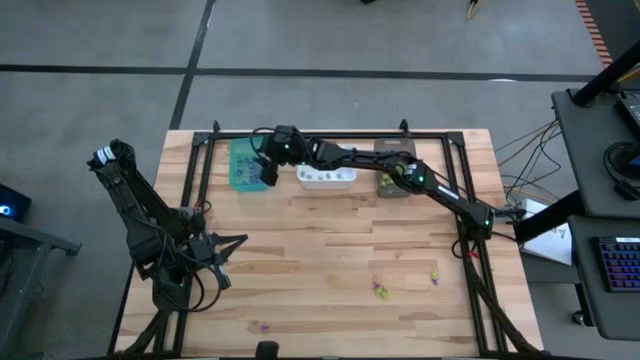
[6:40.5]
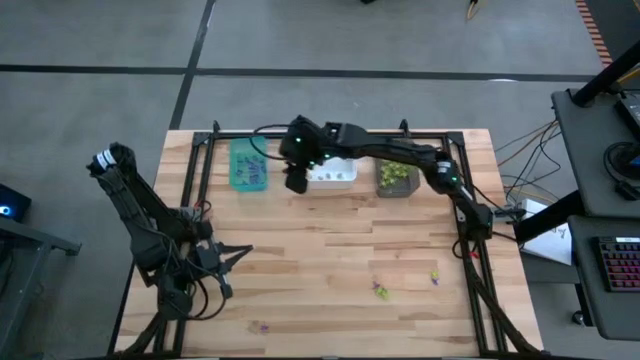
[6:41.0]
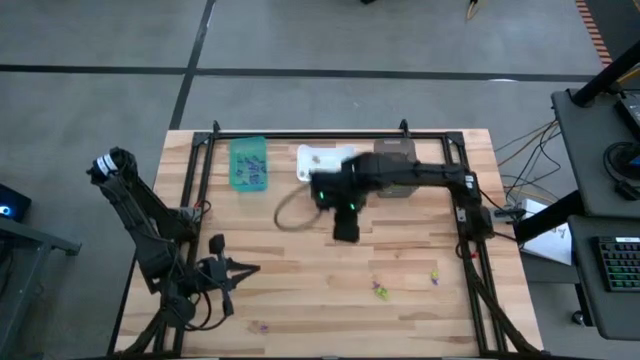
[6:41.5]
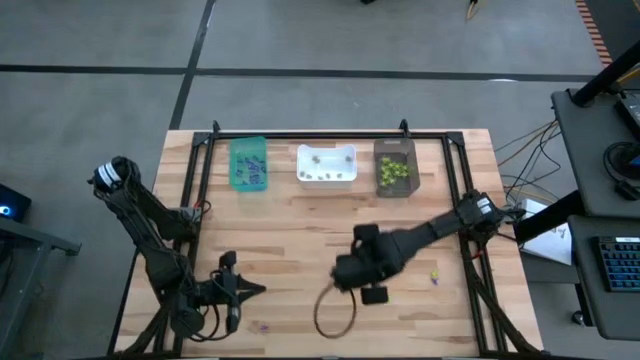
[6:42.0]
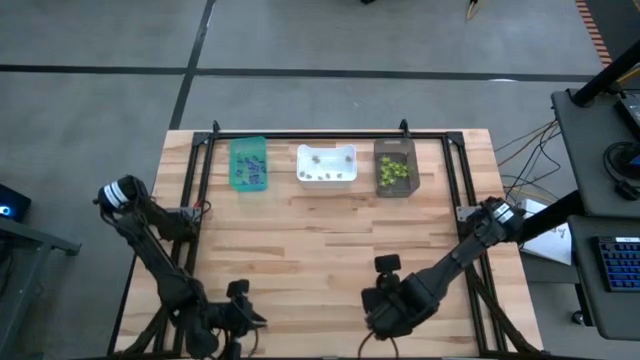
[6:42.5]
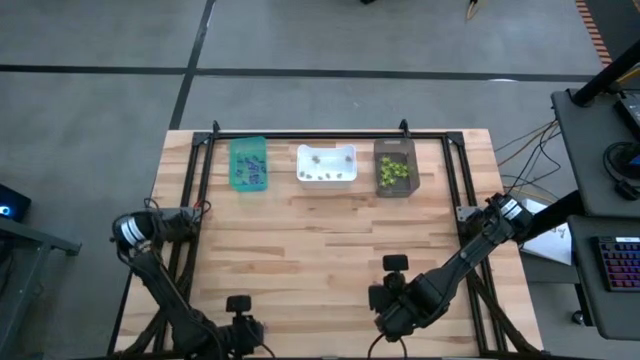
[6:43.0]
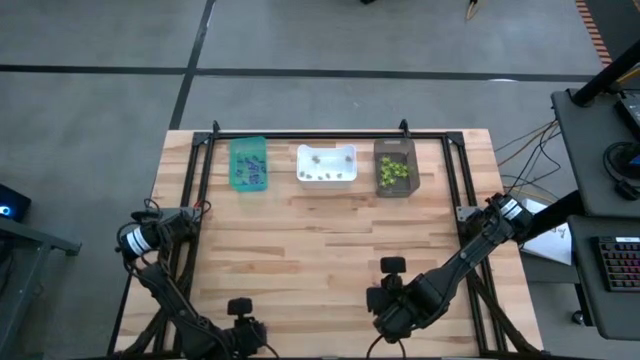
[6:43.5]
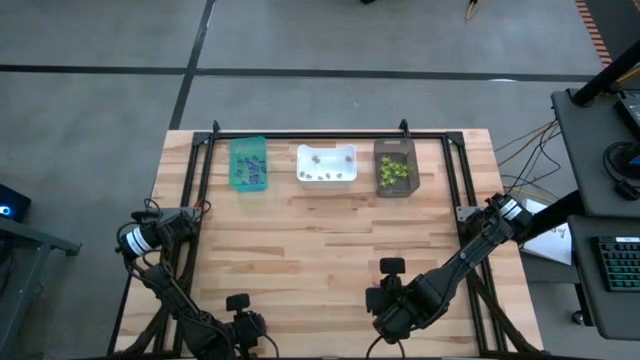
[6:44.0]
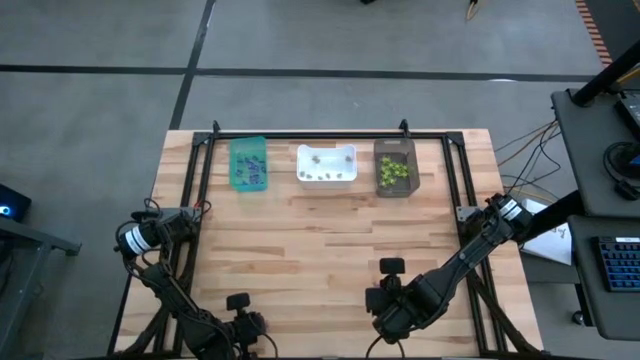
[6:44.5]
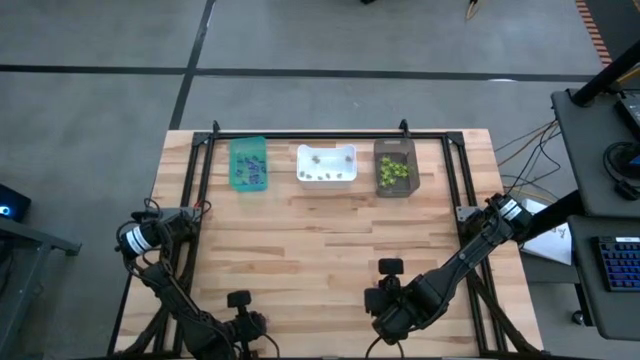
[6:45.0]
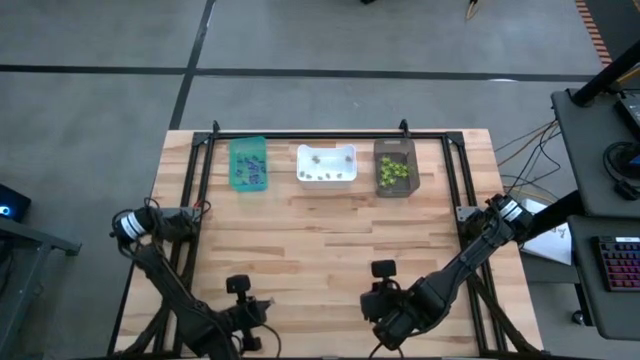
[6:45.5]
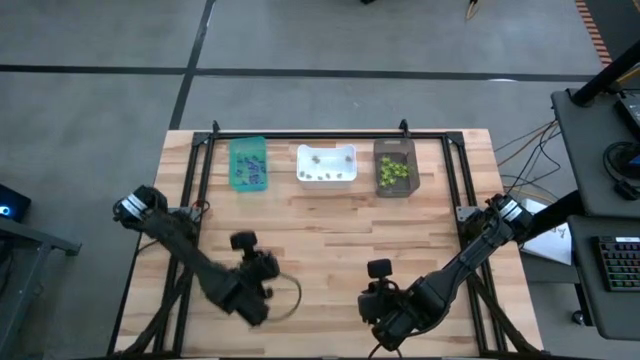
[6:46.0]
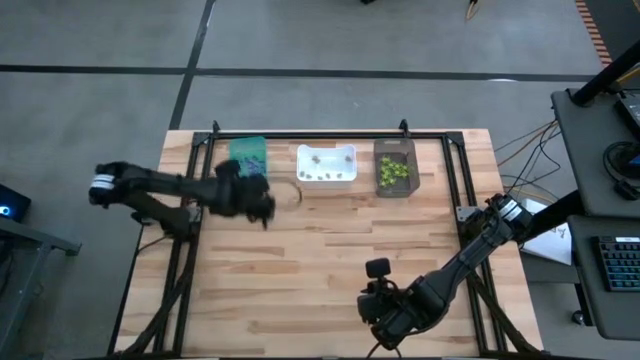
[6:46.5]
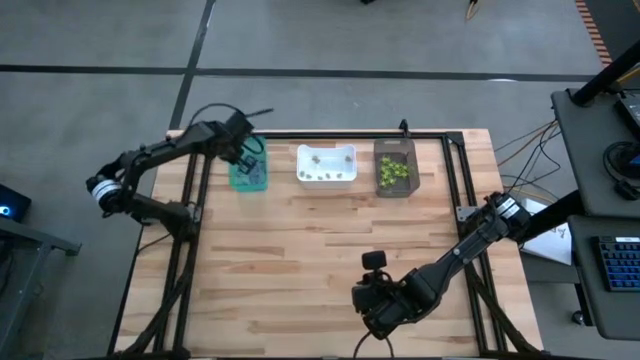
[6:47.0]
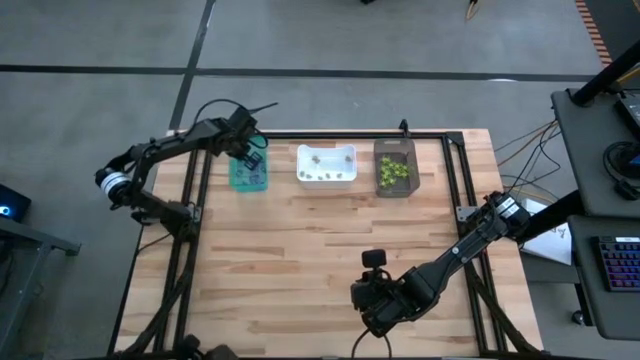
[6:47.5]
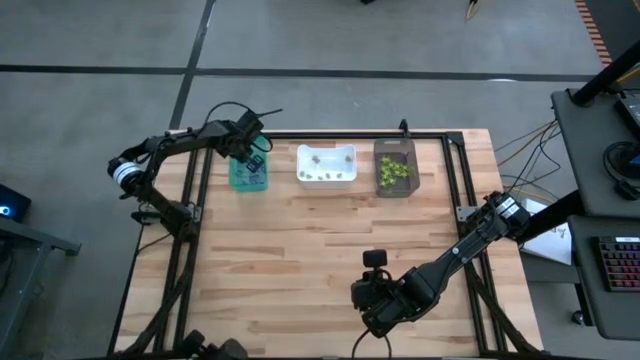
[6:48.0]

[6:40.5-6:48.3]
Task: Sort Halloween decoration
Put the purple witch hat toy into the light blue bin

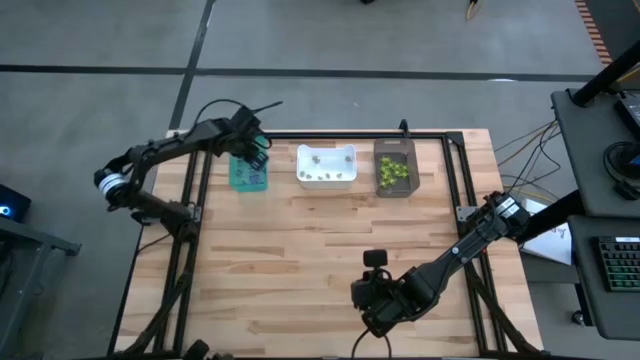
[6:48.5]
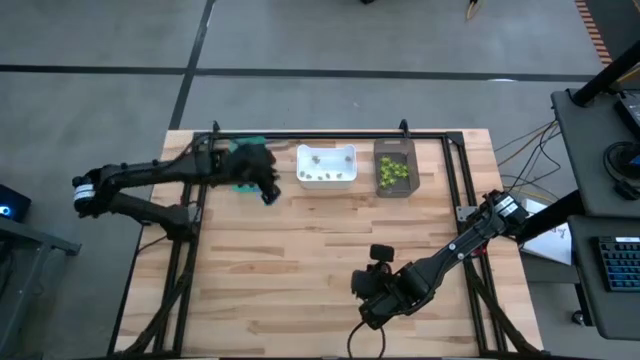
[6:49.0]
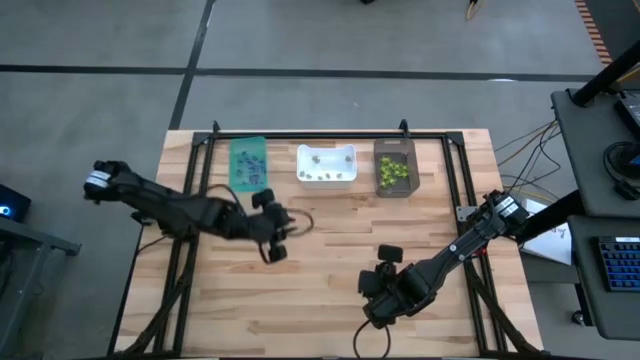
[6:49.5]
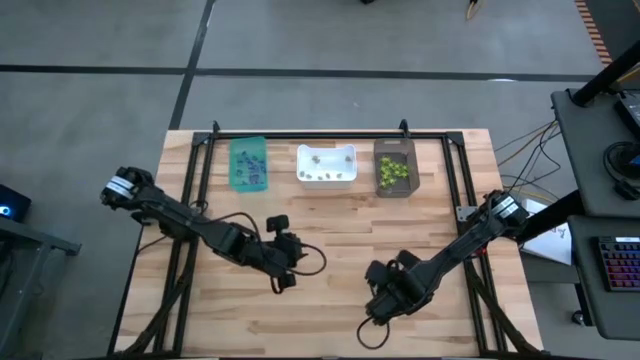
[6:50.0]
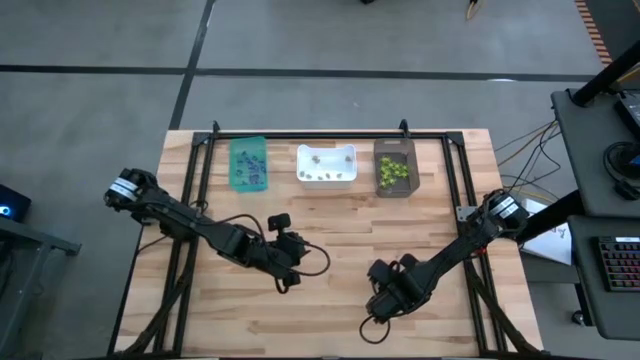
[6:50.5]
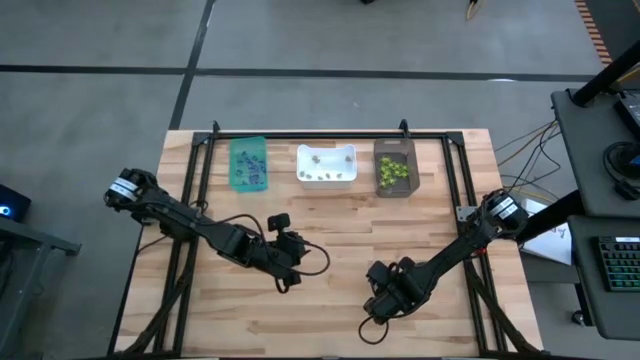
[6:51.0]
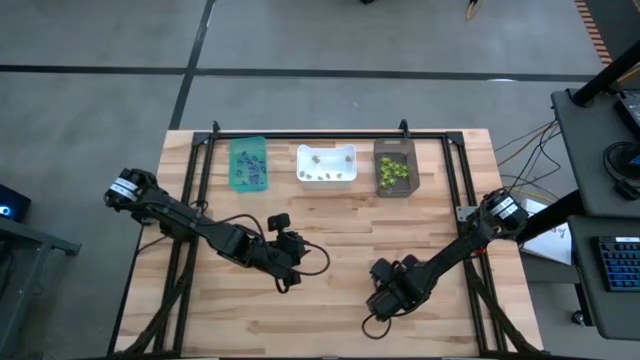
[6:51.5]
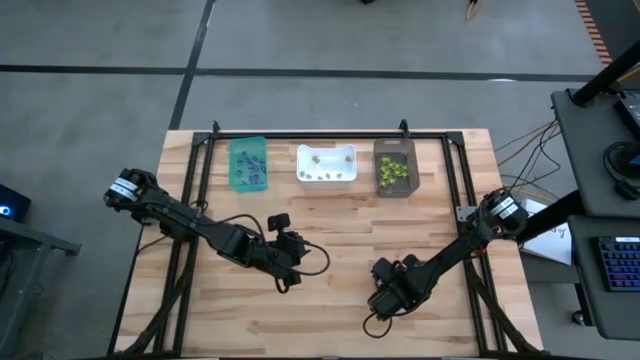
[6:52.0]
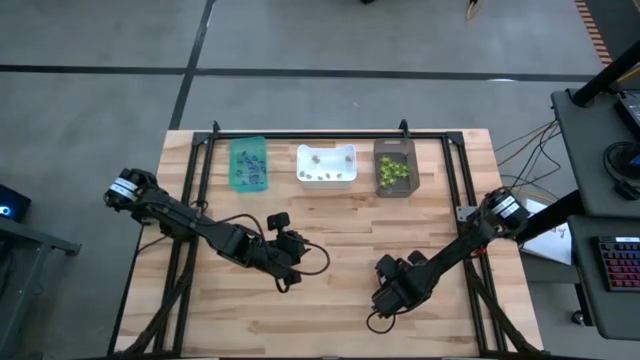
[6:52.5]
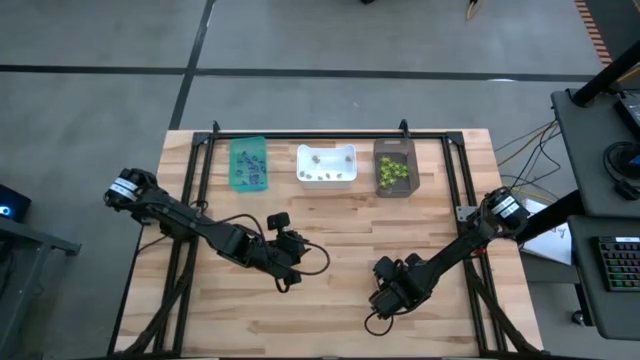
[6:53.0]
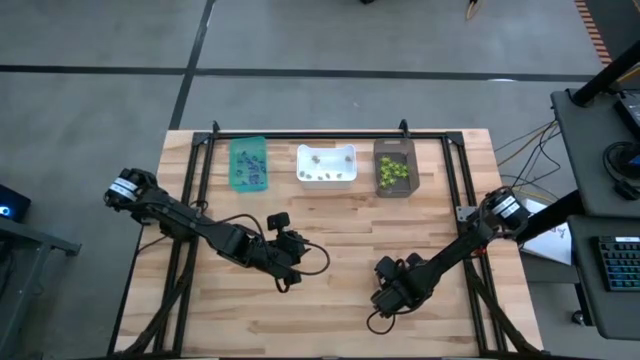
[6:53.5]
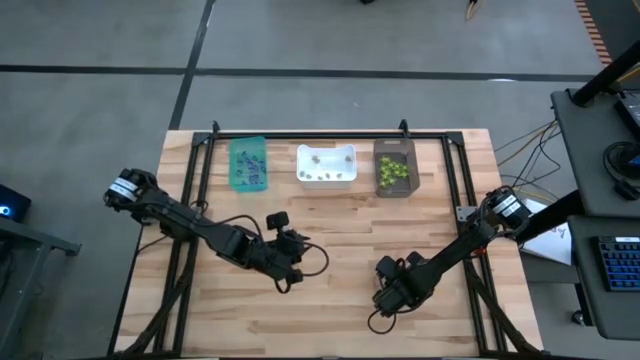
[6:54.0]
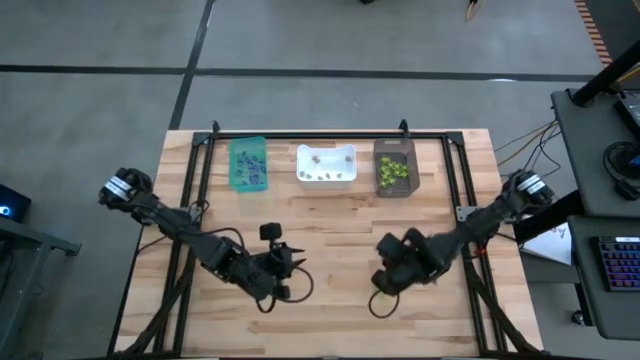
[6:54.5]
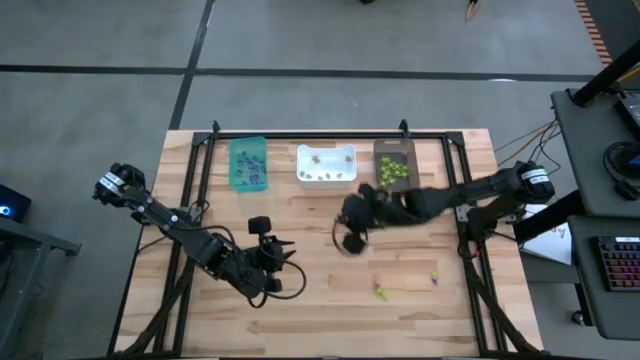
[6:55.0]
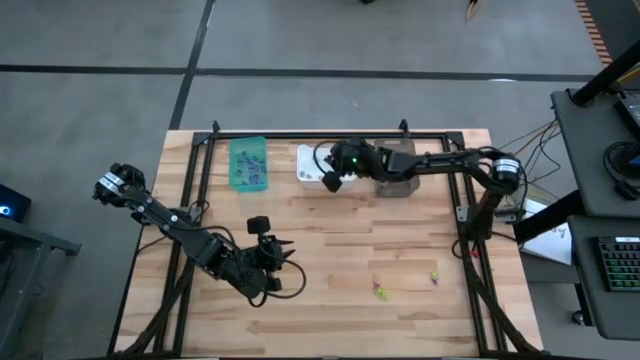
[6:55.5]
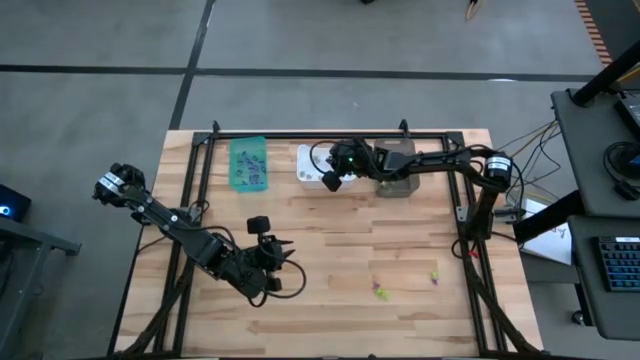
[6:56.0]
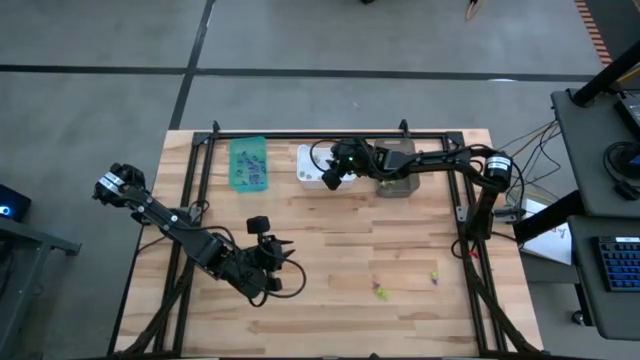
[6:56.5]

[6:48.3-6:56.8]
Put the white skull toy into the white bin

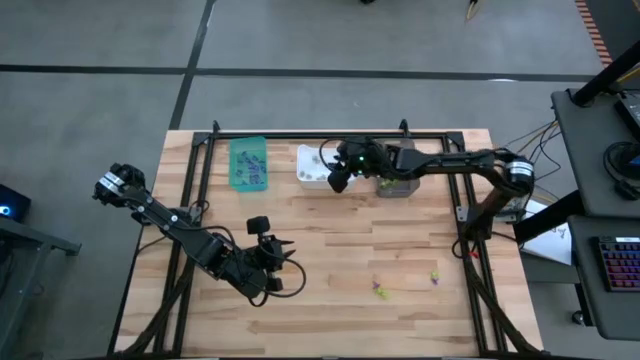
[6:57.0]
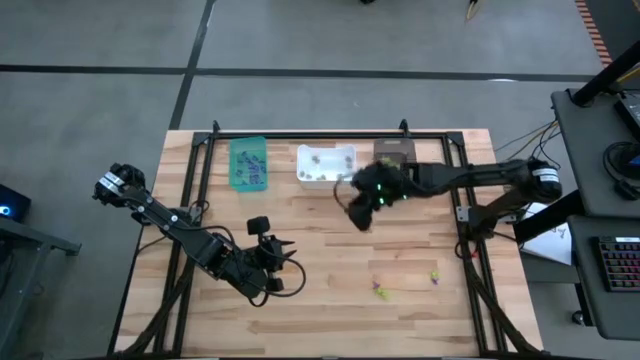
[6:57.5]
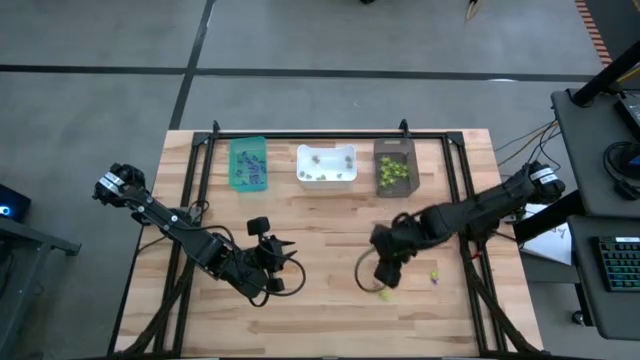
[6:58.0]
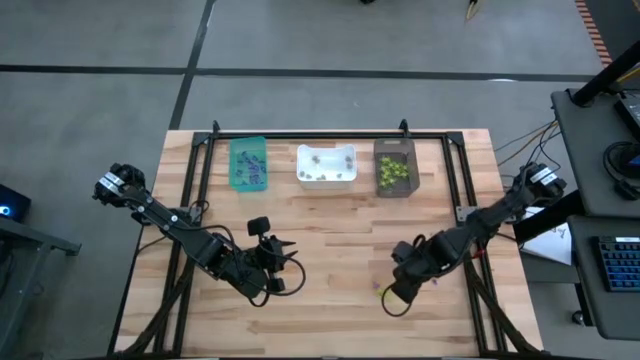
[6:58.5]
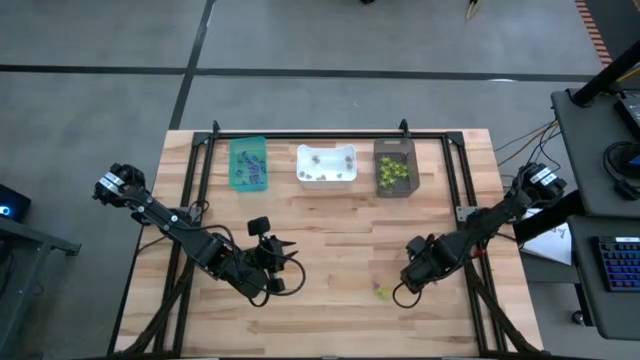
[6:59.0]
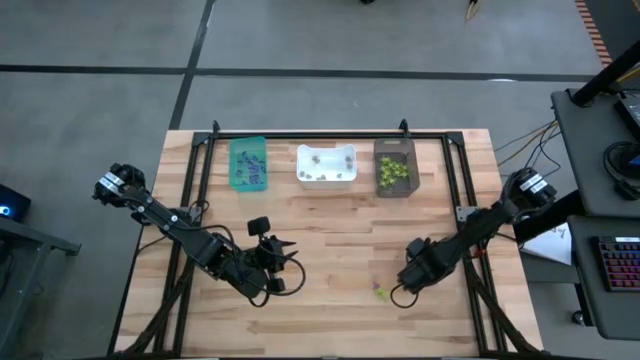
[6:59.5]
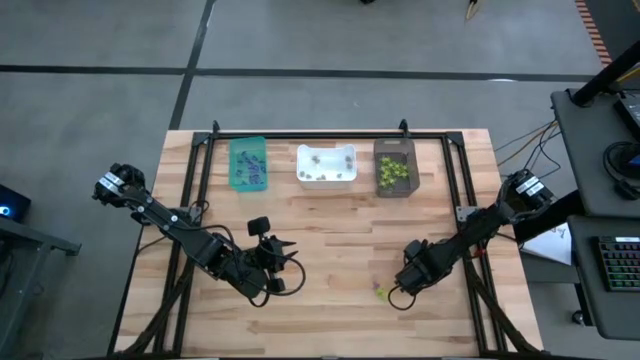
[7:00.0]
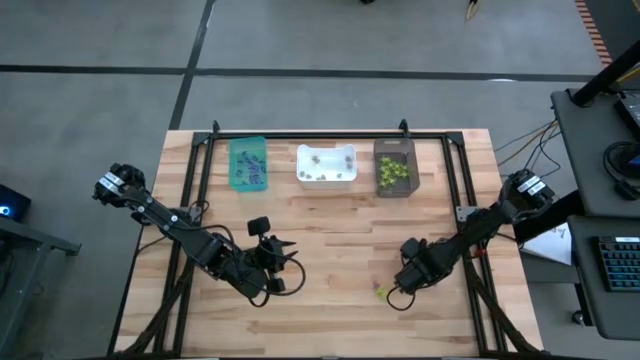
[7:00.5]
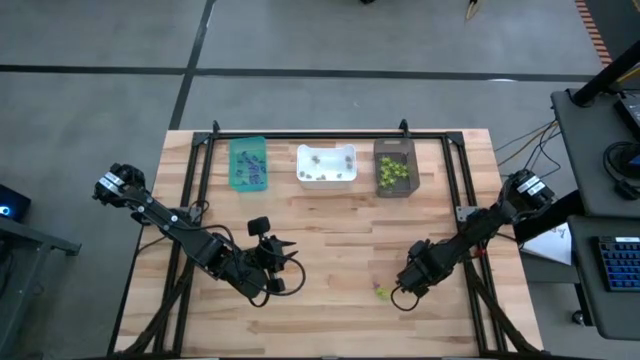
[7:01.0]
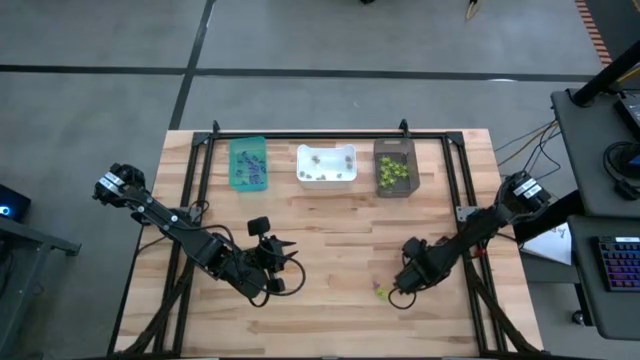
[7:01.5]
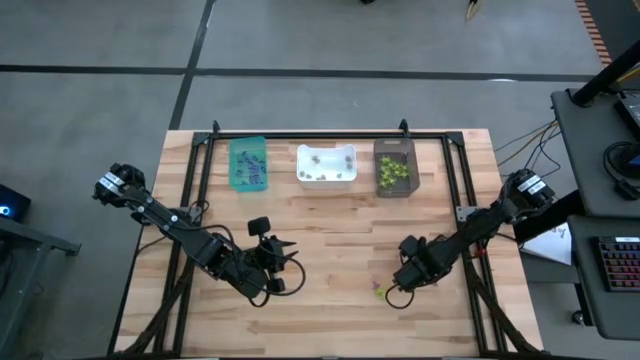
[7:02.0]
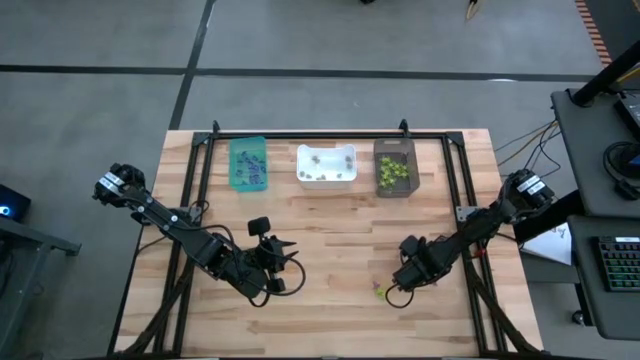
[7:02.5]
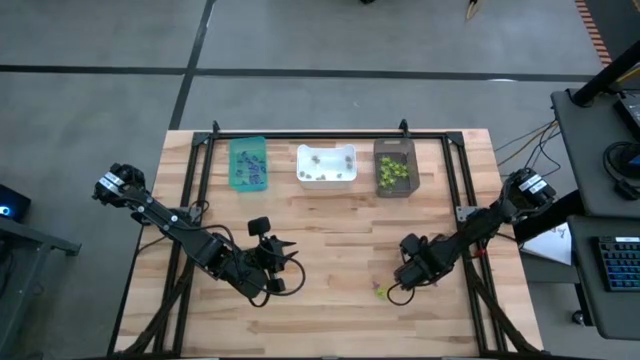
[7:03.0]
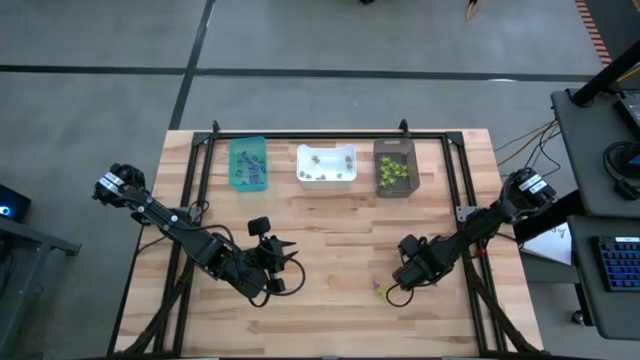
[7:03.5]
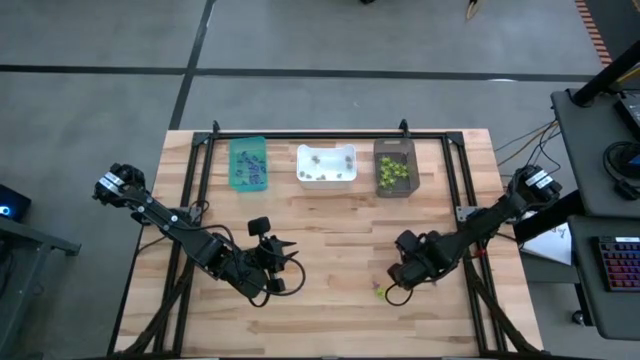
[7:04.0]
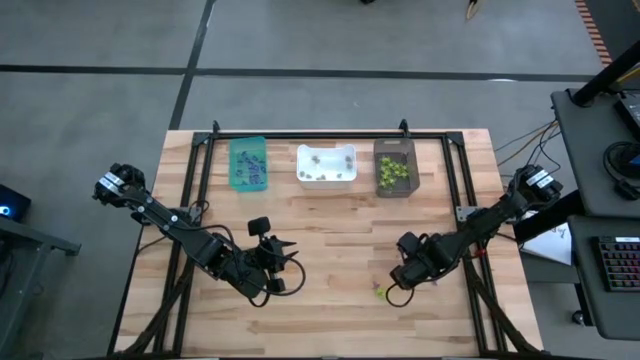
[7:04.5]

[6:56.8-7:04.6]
Put the green spider toy into the black bin
